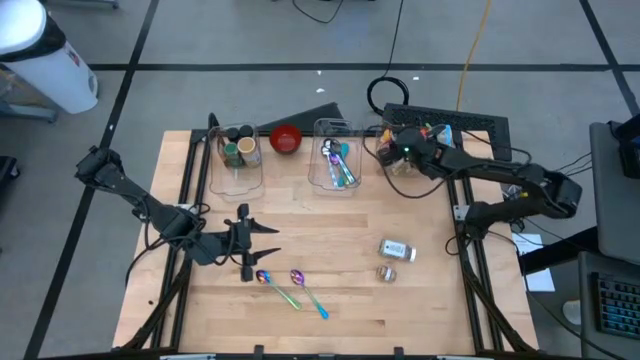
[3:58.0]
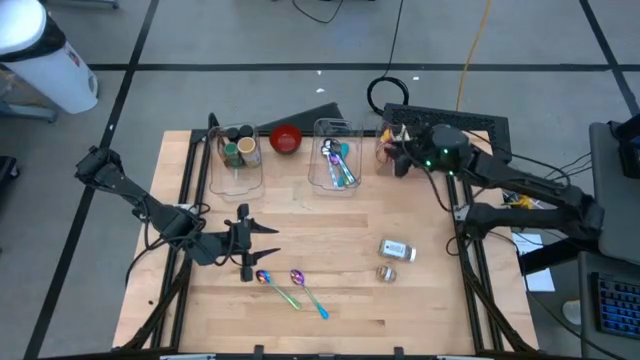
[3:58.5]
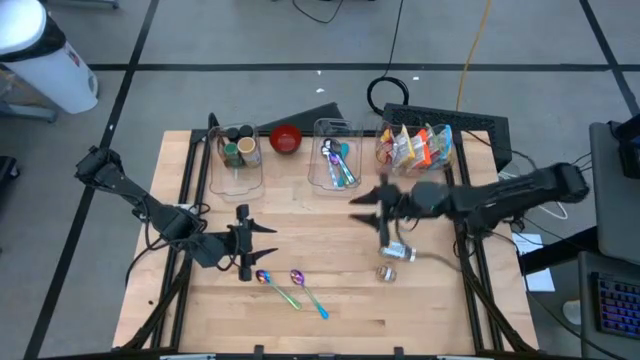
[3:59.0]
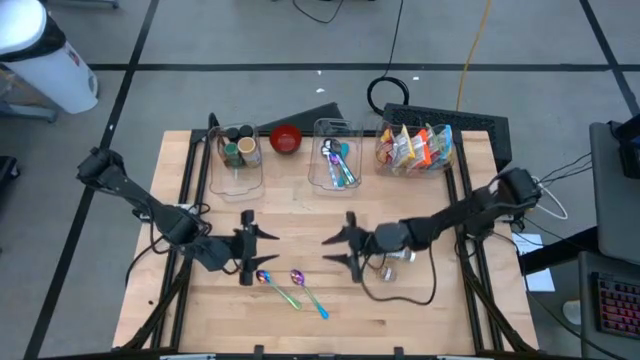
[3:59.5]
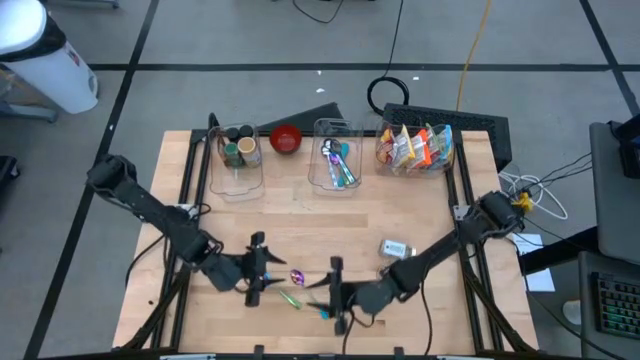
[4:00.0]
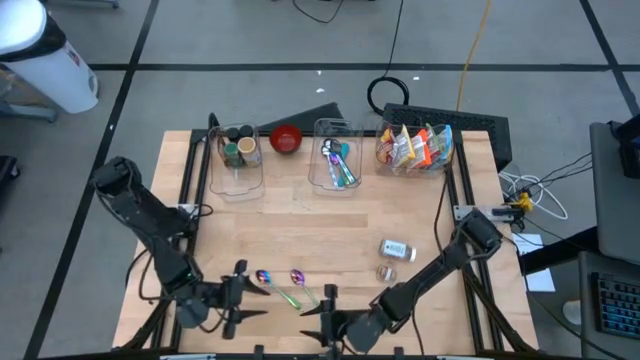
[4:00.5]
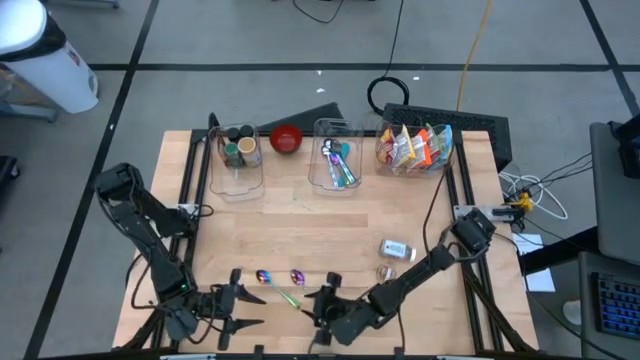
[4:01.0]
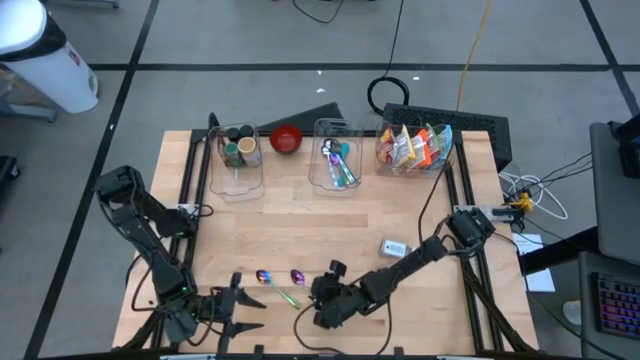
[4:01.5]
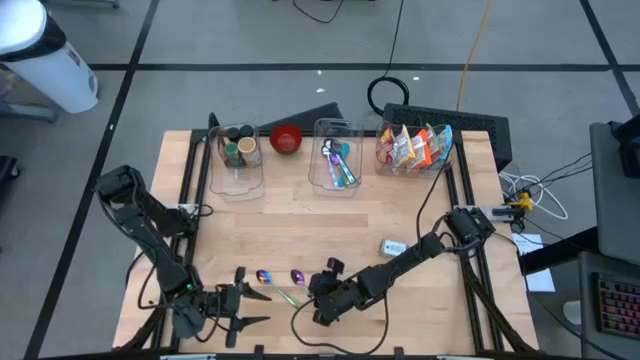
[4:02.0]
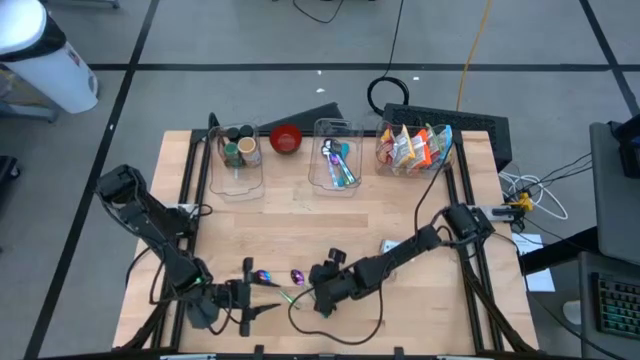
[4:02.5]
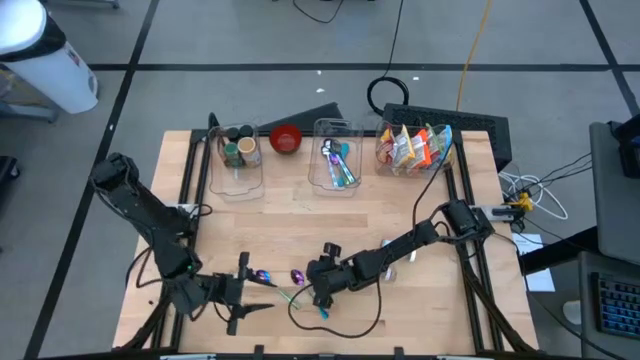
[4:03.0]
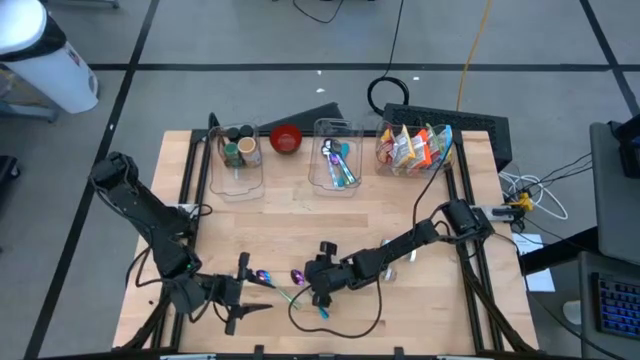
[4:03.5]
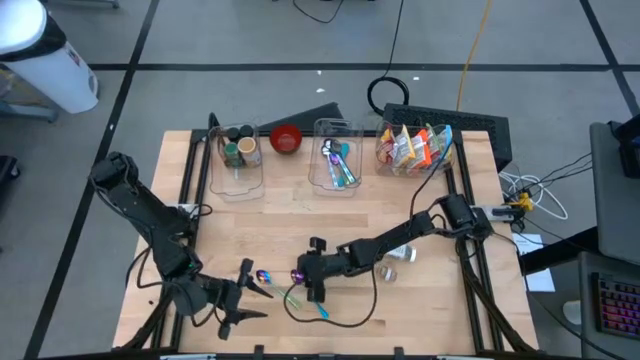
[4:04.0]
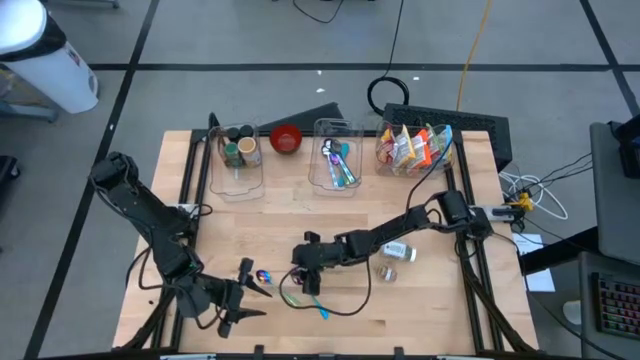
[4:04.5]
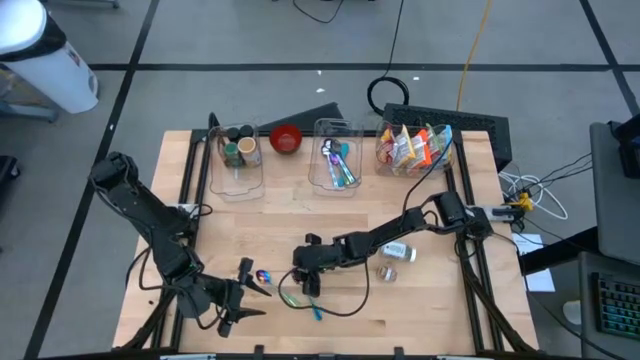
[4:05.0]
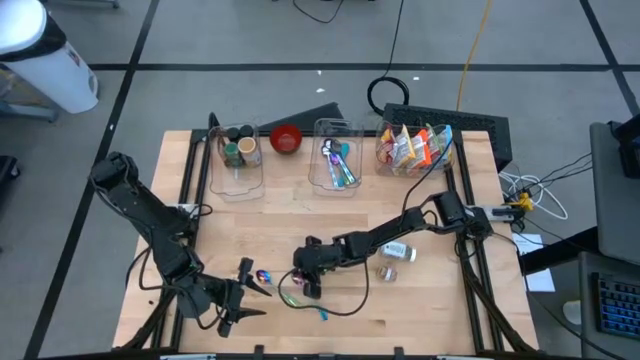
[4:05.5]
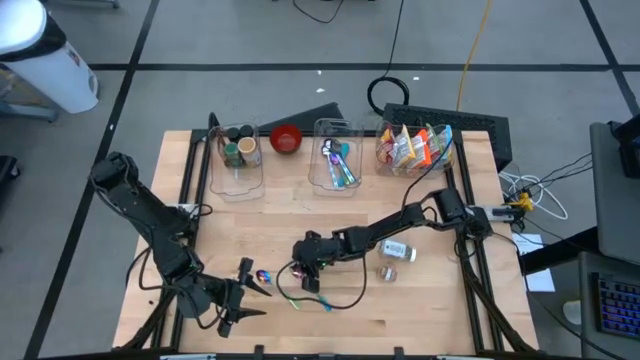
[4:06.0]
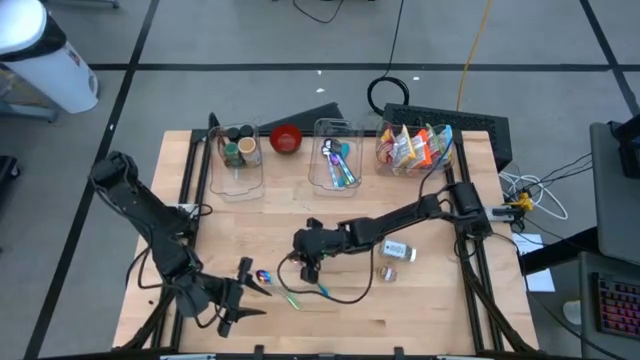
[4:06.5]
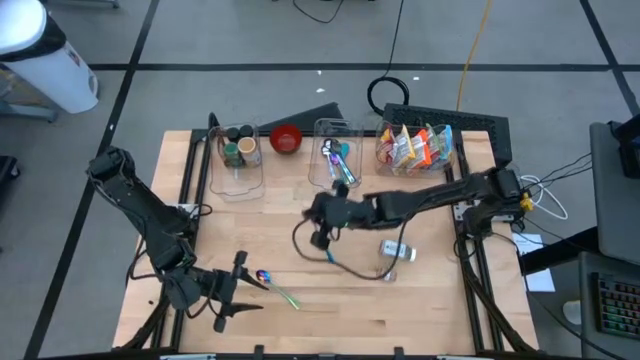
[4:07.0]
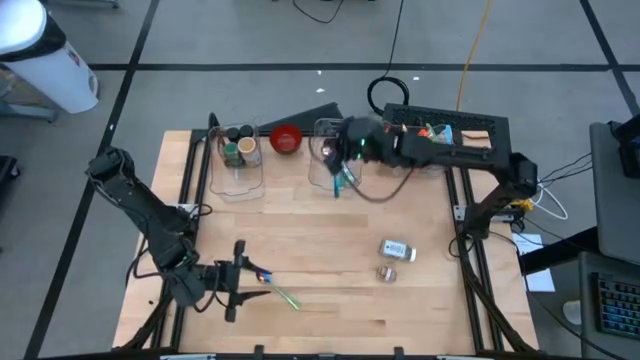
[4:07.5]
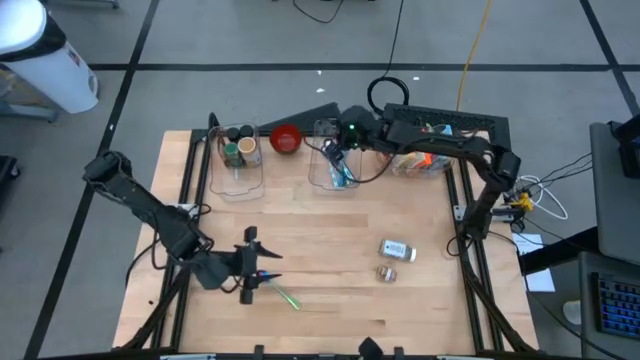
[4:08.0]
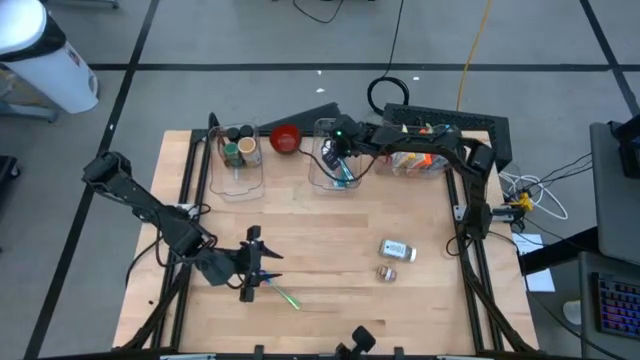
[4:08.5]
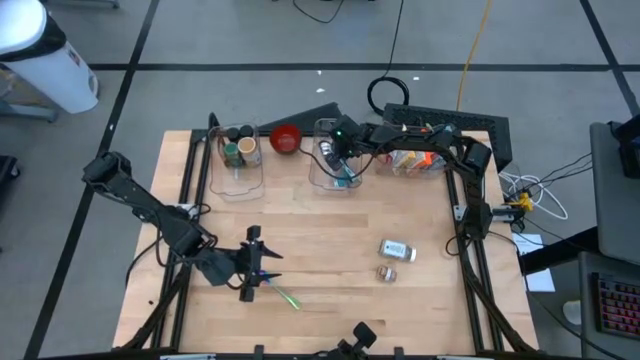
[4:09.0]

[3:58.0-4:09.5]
Task: Pick & Place Food Item
Put the right violet spoon into the middle transparent bin

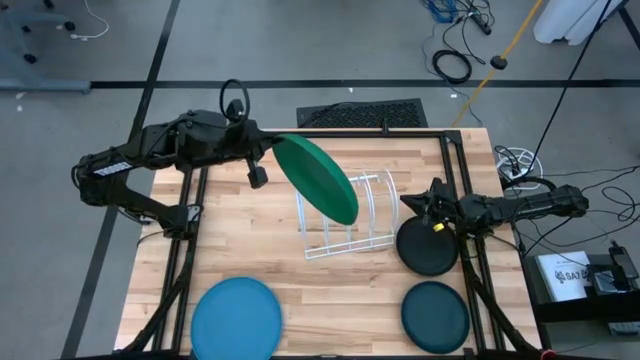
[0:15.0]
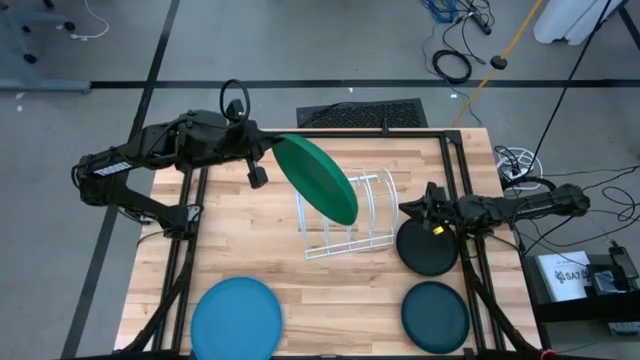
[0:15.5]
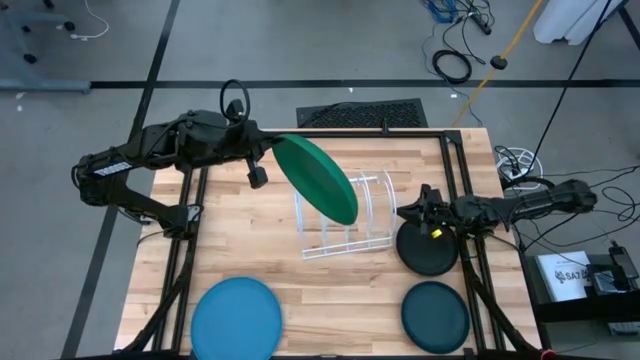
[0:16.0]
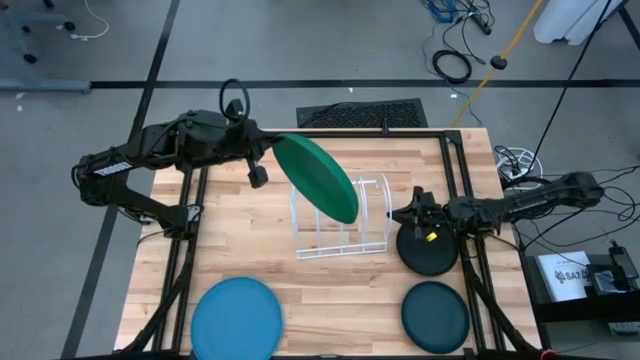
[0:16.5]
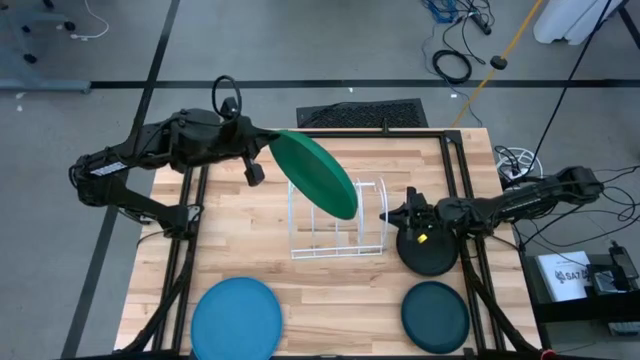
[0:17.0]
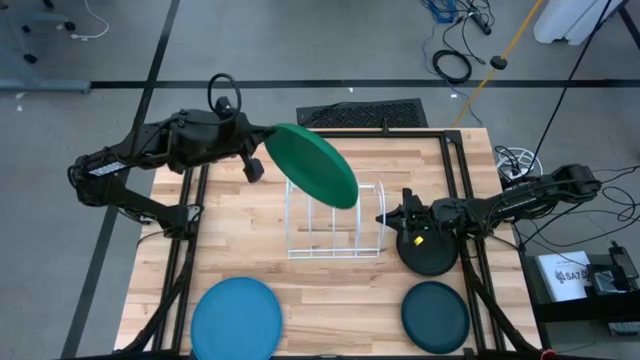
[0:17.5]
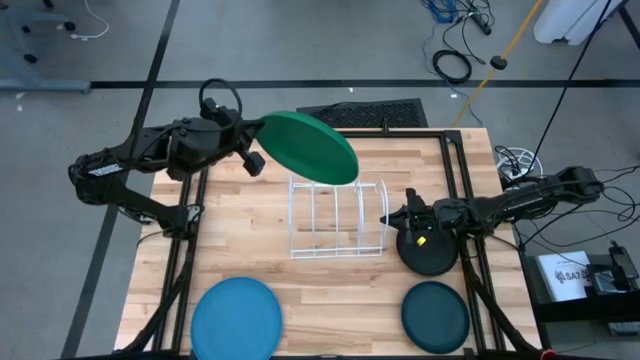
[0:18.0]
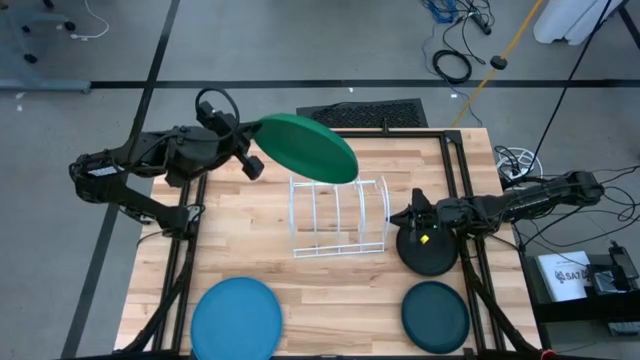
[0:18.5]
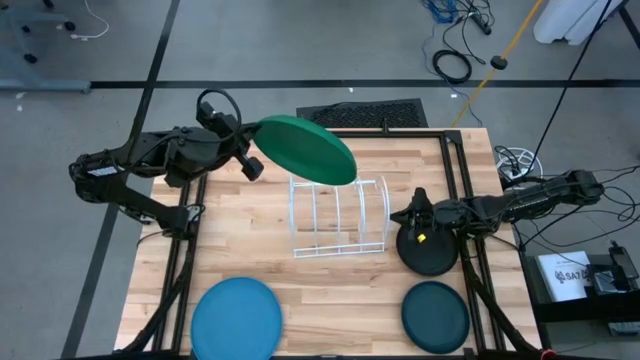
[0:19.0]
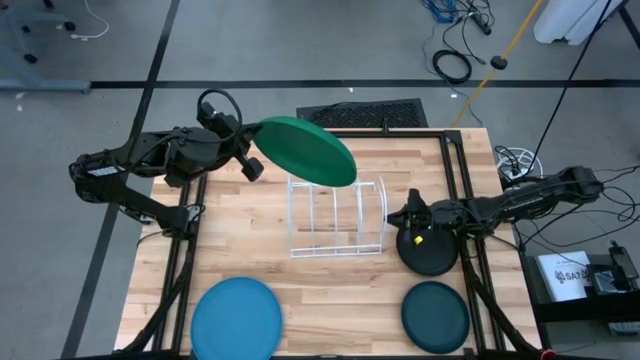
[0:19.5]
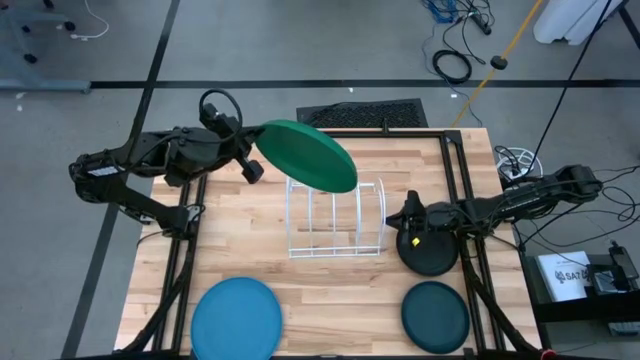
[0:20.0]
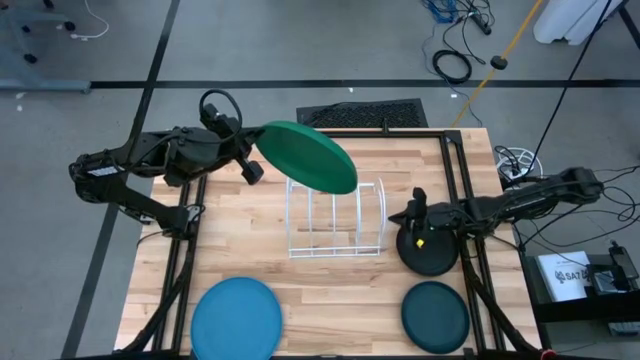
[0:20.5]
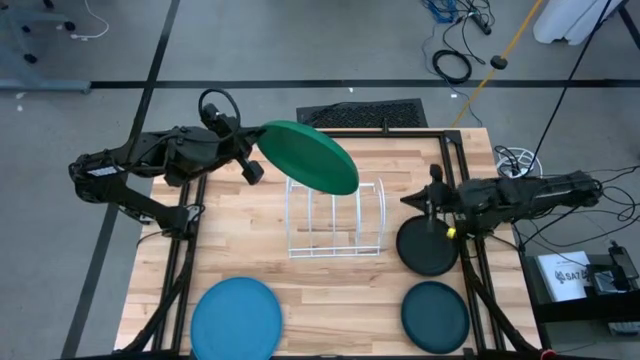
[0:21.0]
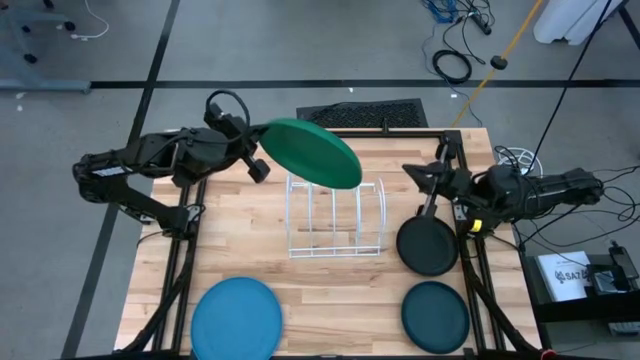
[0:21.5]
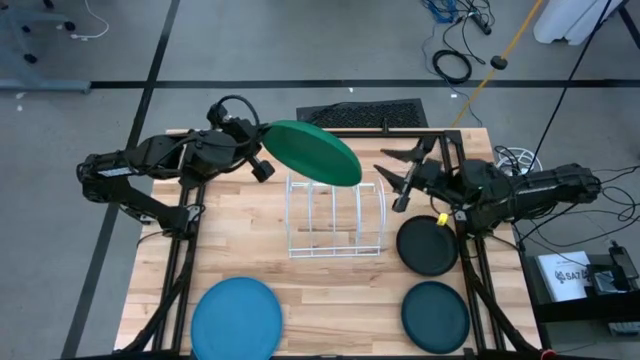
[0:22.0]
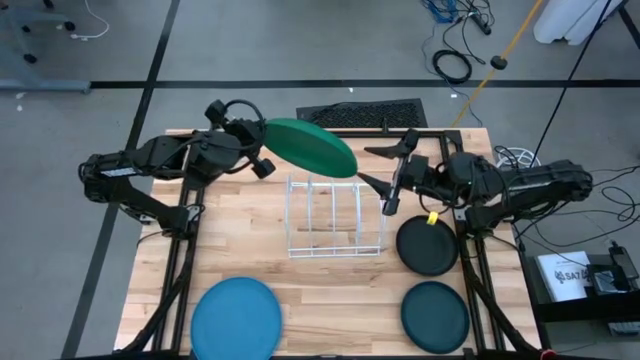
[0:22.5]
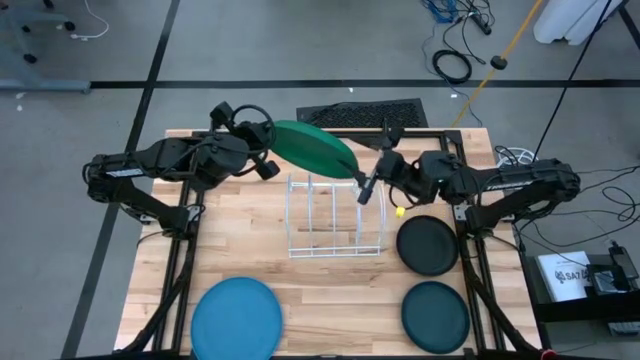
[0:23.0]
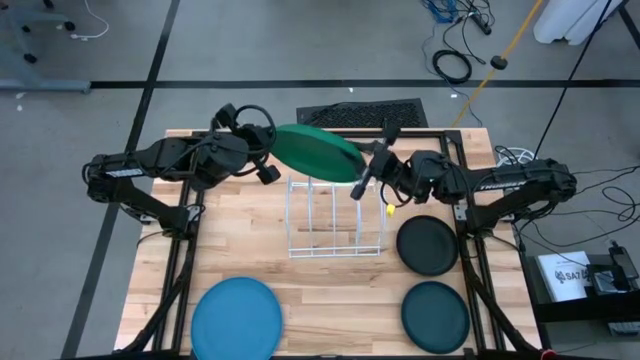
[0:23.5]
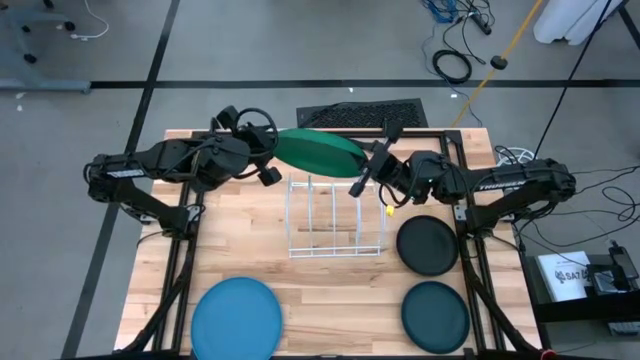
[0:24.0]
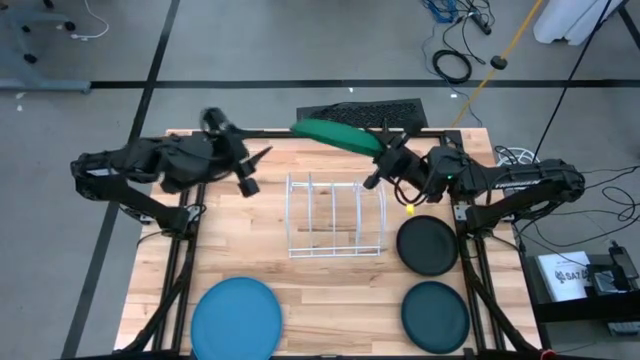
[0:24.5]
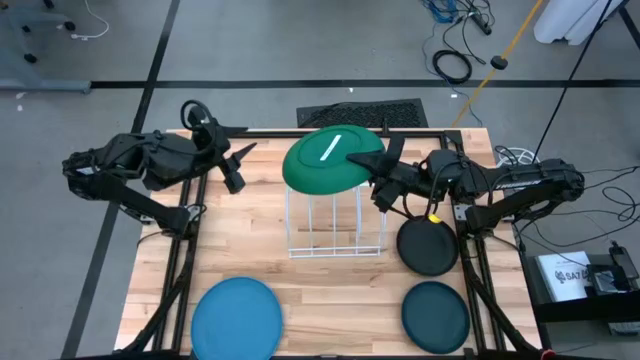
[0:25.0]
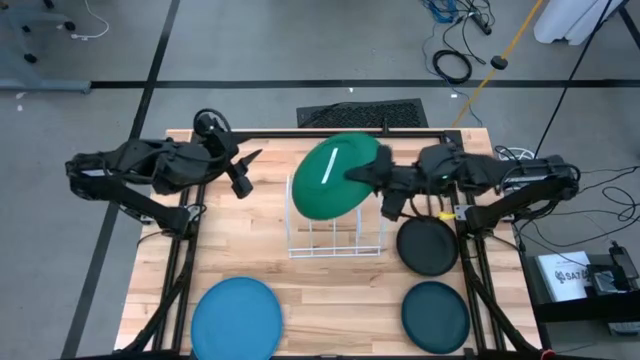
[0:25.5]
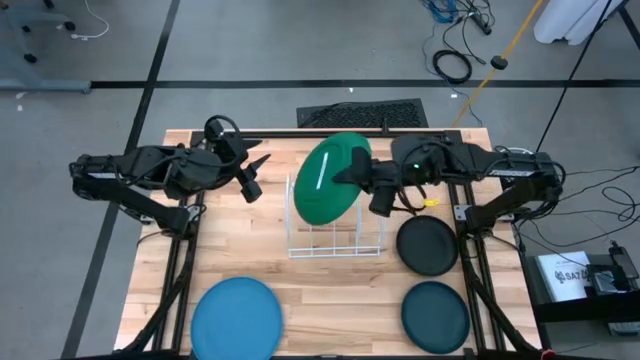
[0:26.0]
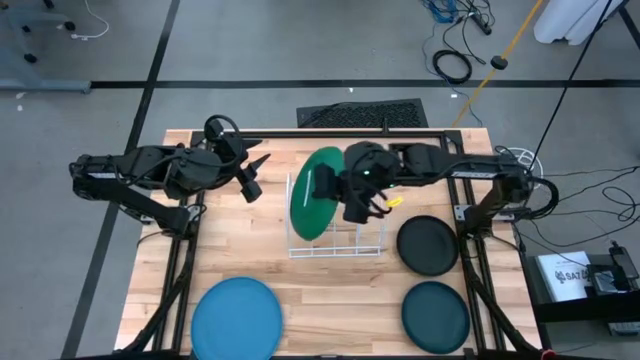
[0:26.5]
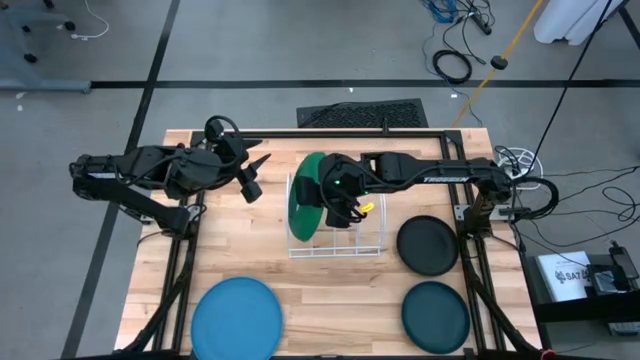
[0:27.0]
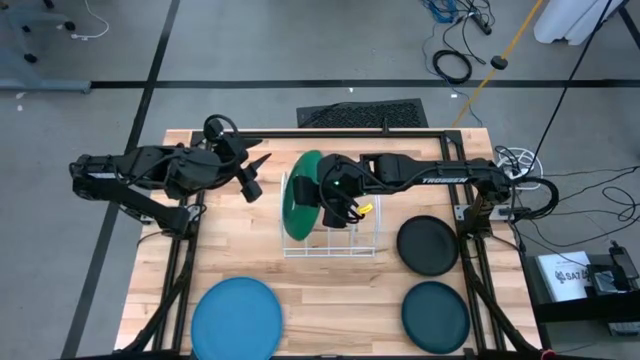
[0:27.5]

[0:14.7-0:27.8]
Task: Sort dishes
Put the green plate into the dish rack
